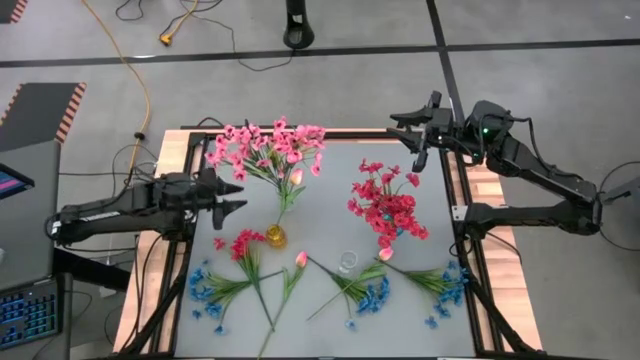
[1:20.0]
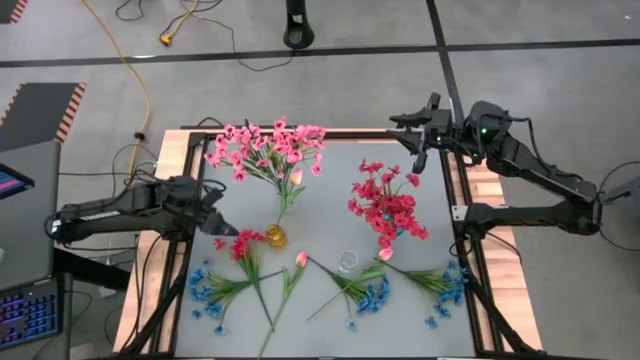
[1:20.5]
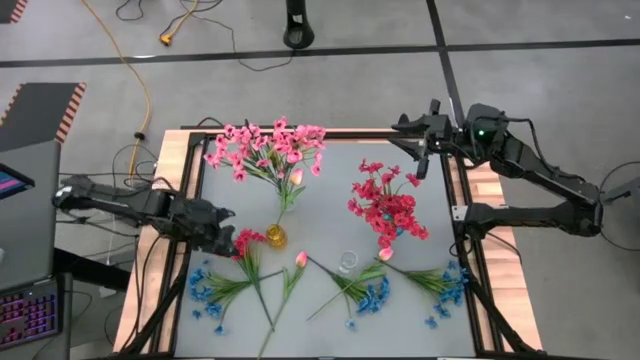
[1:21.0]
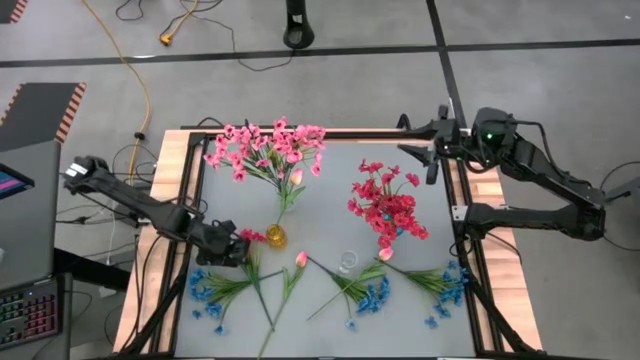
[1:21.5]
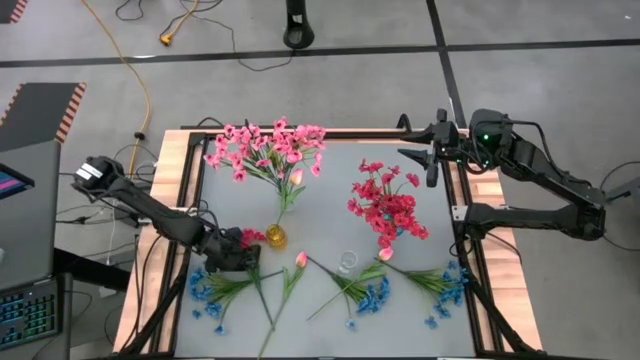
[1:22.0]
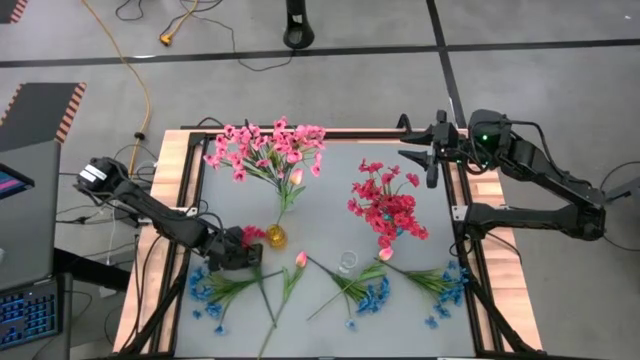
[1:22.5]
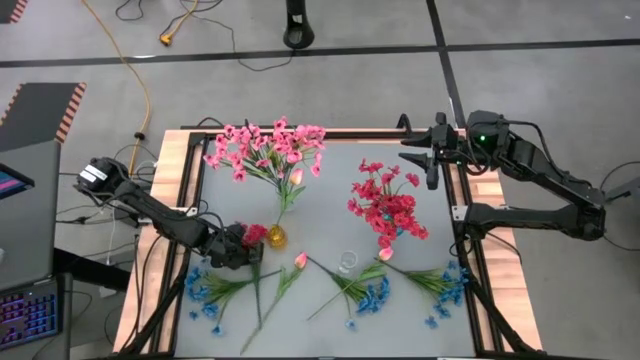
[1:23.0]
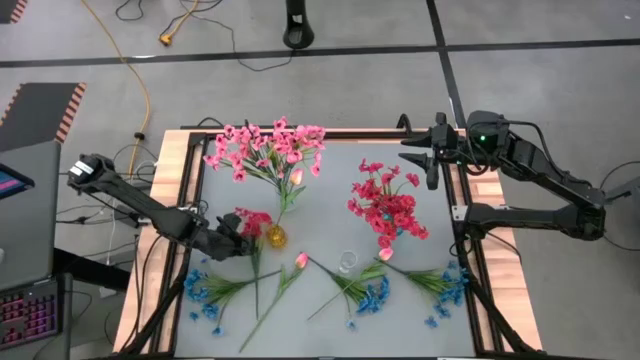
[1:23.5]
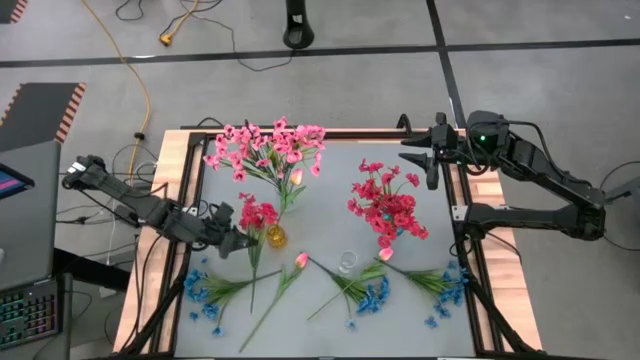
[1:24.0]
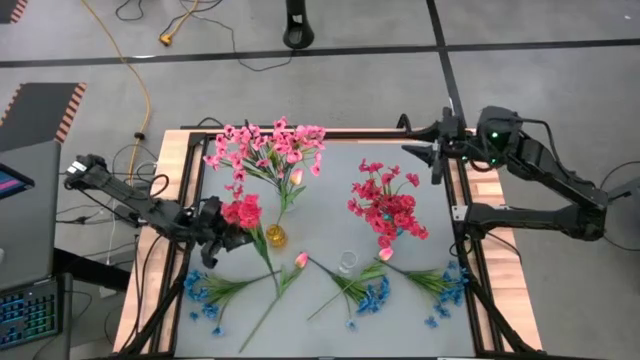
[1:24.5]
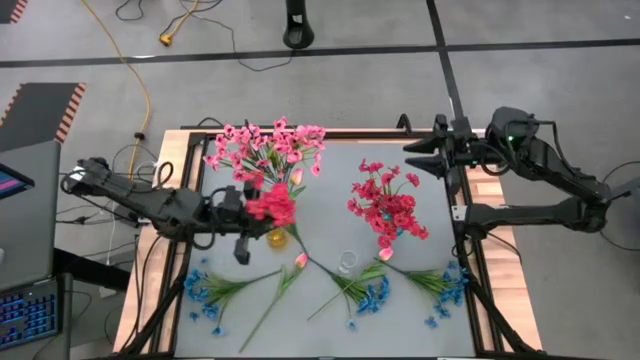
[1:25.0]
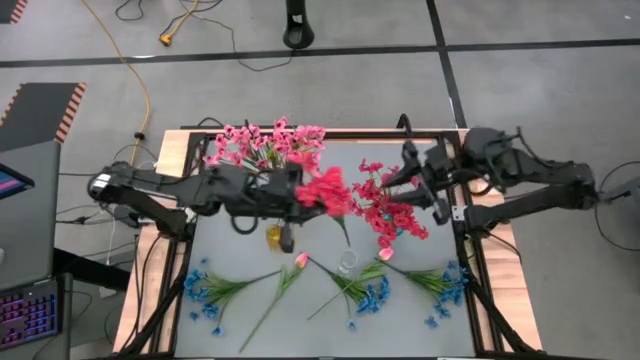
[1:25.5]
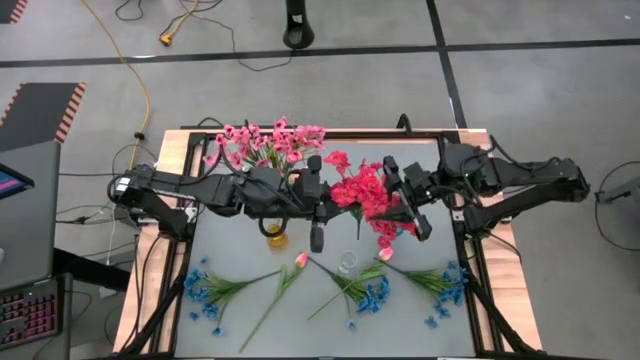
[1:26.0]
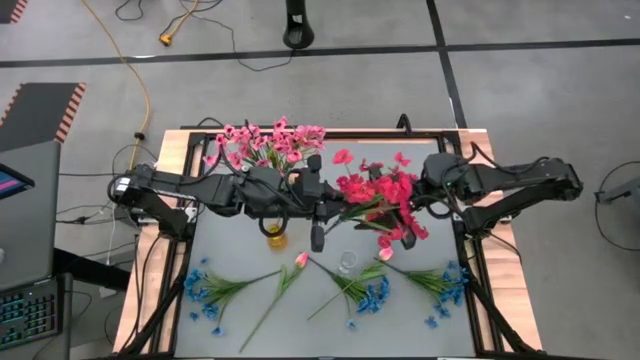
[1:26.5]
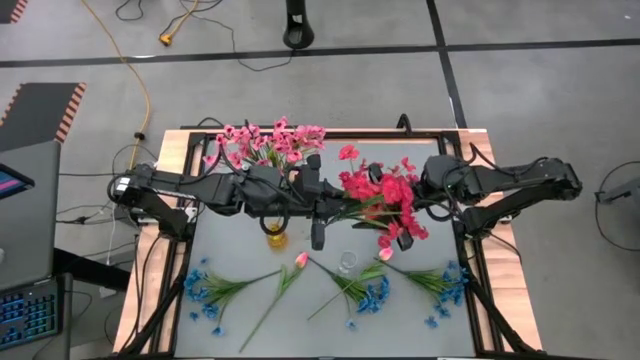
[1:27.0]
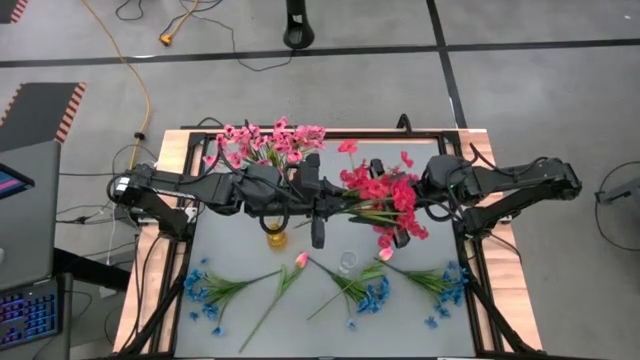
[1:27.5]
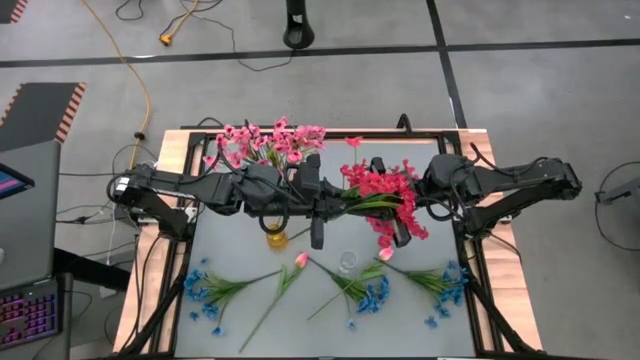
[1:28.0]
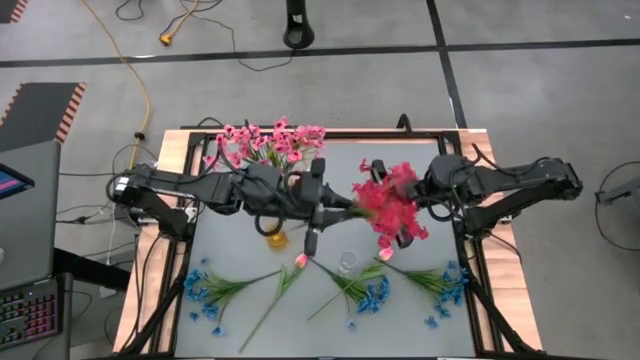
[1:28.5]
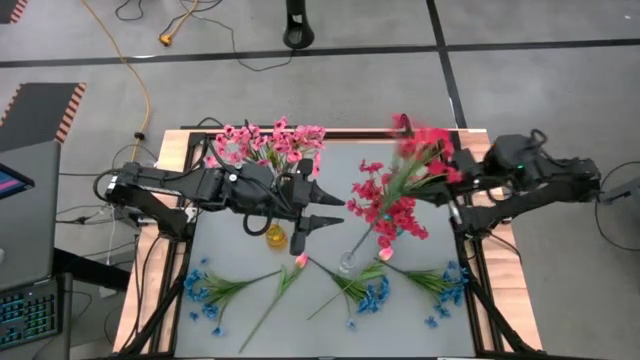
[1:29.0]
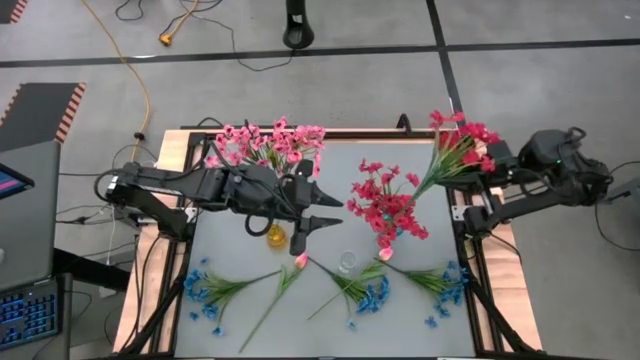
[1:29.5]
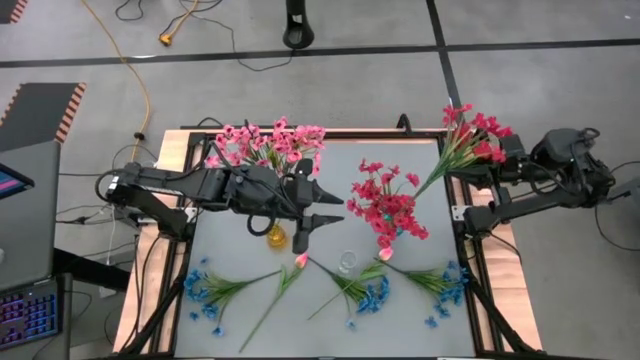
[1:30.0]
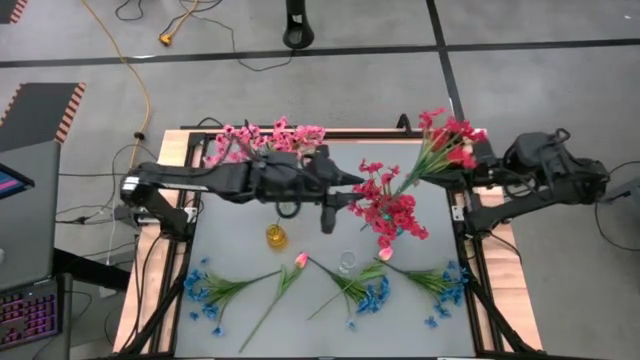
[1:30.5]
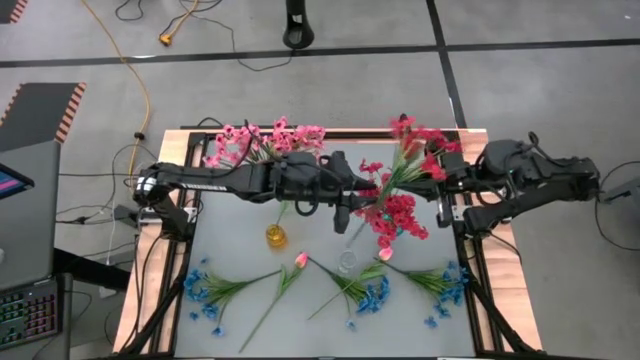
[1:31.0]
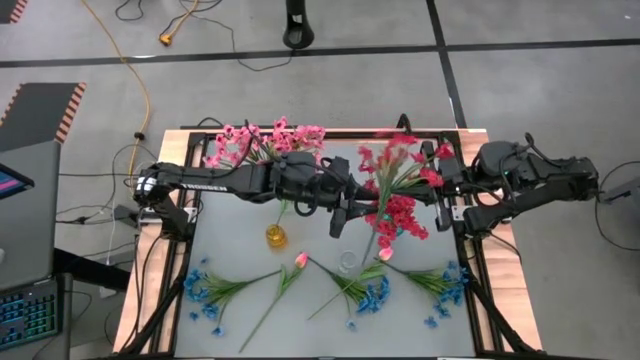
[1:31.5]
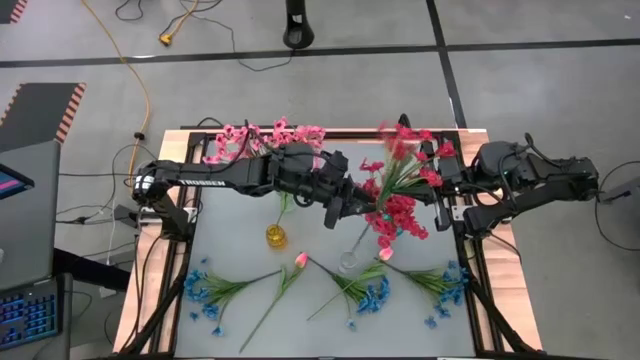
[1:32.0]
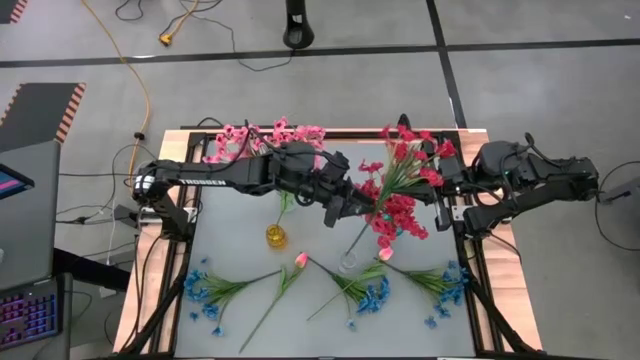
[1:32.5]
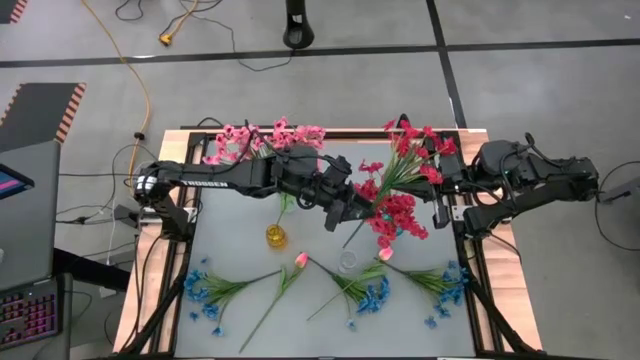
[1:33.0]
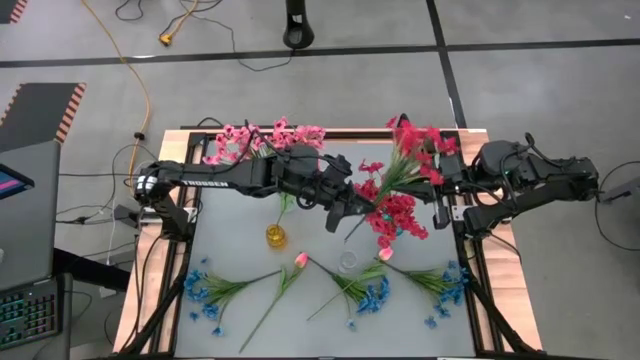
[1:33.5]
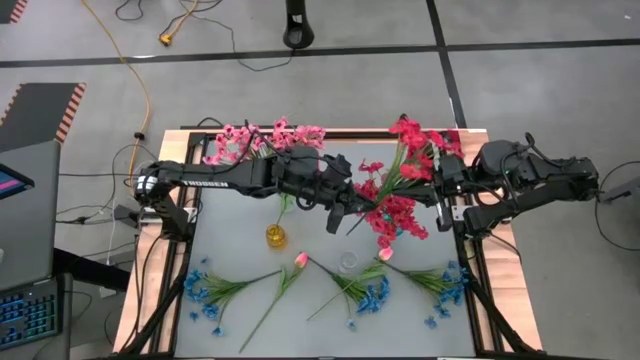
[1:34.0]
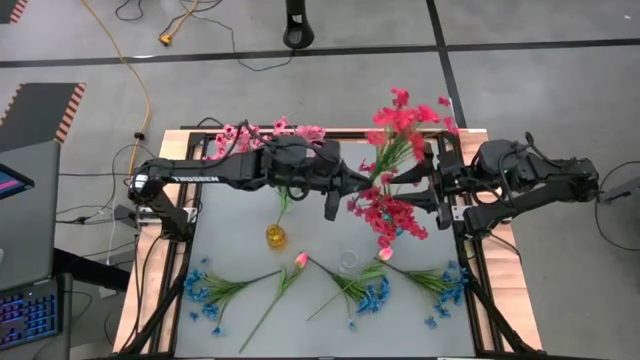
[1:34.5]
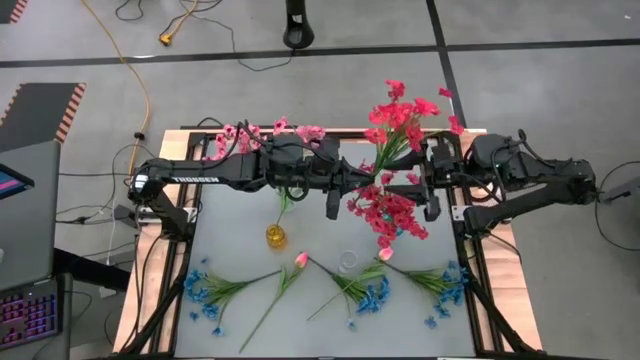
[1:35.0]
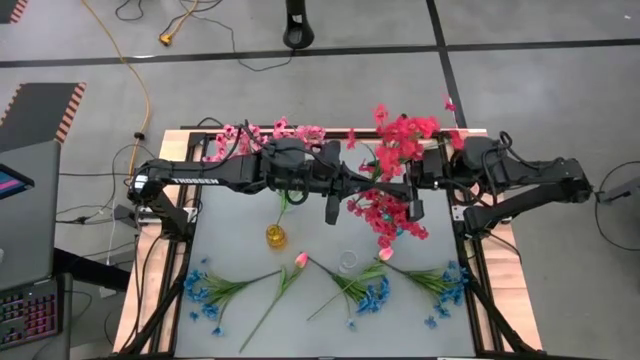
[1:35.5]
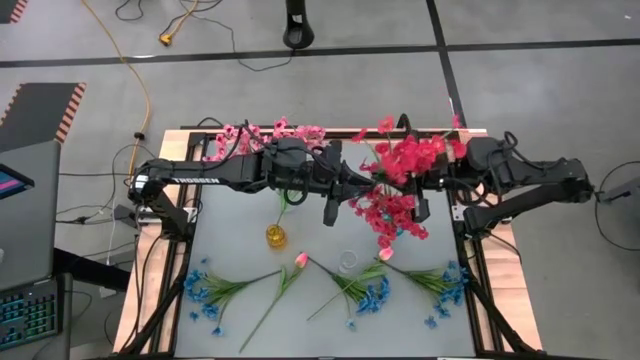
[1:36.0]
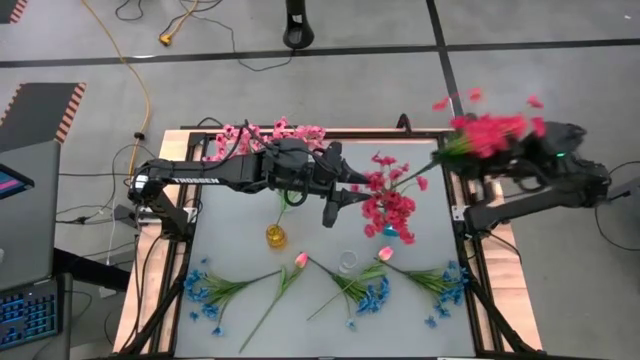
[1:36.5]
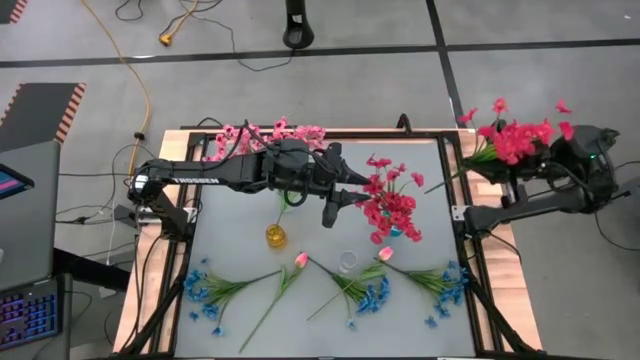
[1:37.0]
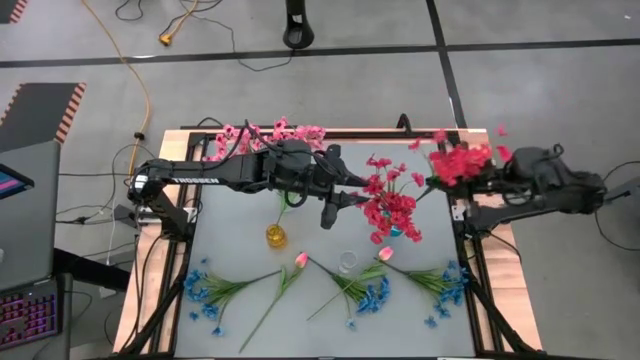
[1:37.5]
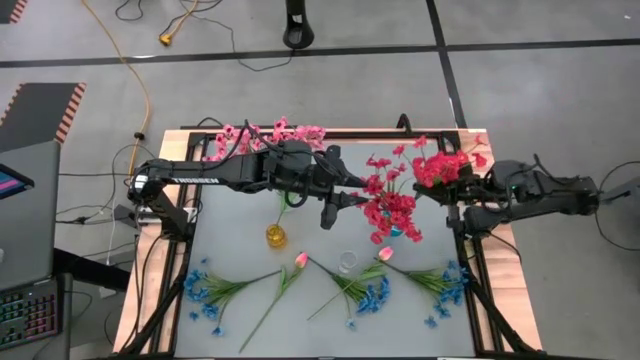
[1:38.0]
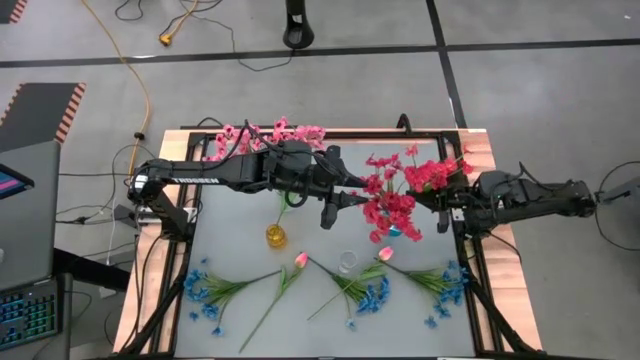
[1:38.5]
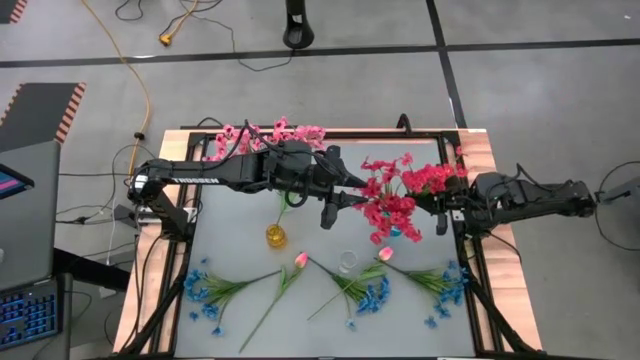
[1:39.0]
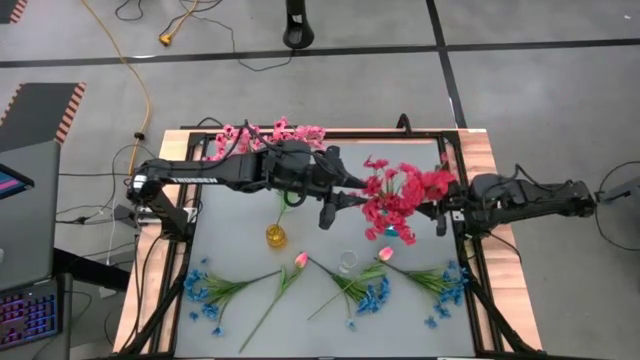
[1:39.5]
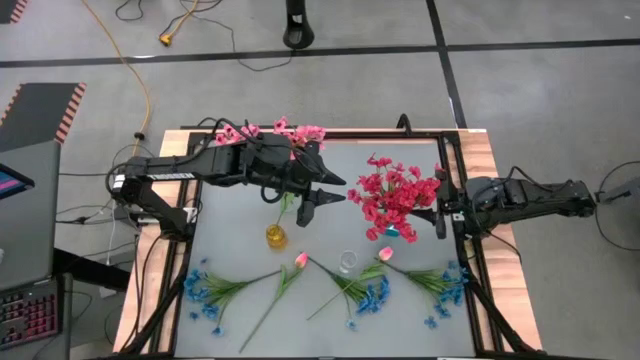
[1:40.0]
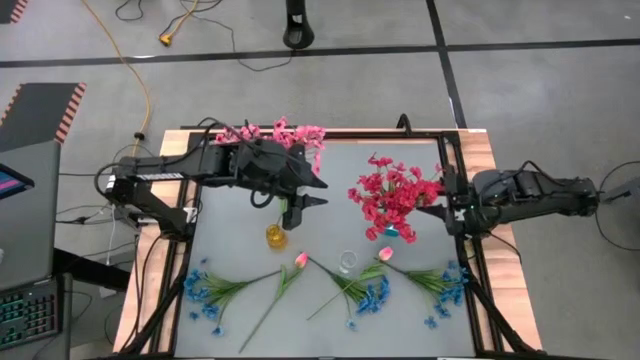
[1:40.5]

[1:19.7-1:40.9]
Task: Sort flowers into vase by color
Put the red flowers into the blue vase

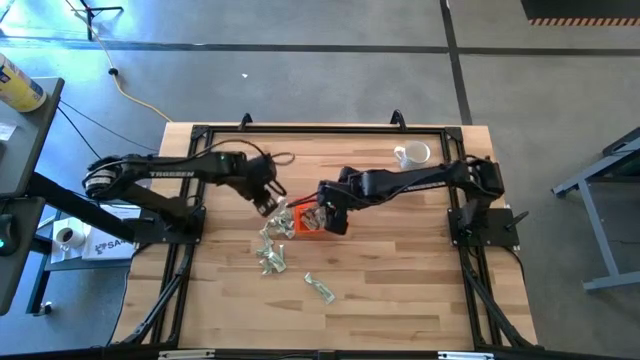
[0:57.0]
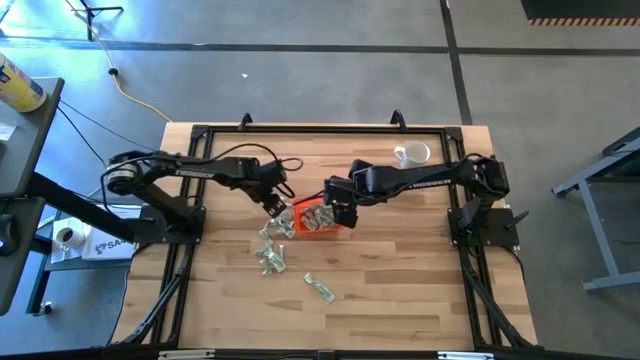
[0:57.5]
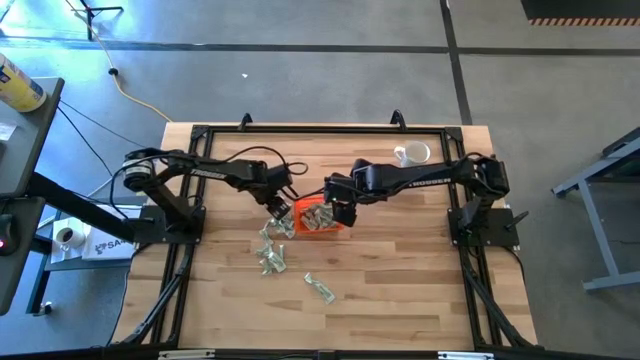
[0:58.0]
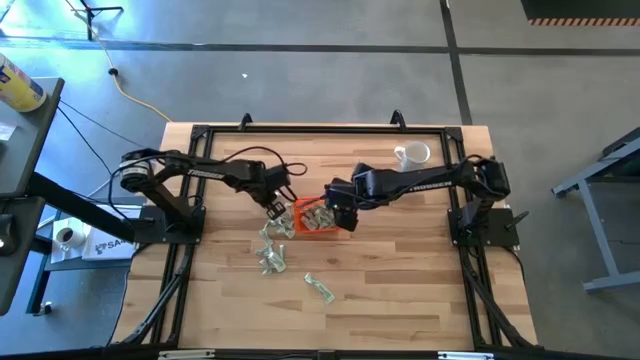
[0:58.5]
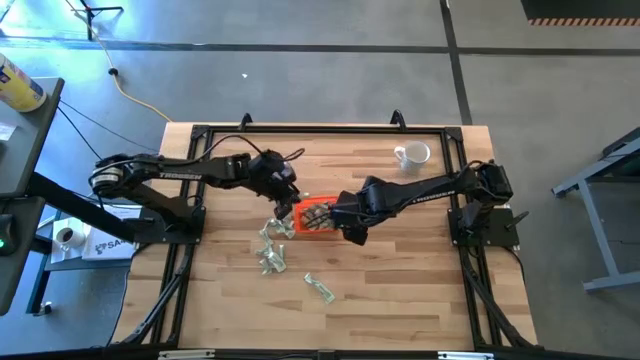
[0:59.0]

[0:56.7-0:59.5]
Task: Pick and place Stevia / Truvia into bins
Put the stevia packet into the orange bin
